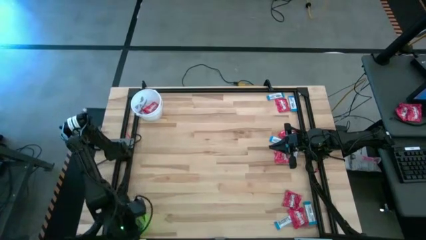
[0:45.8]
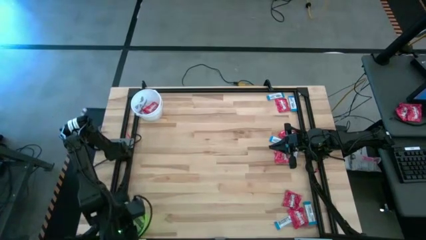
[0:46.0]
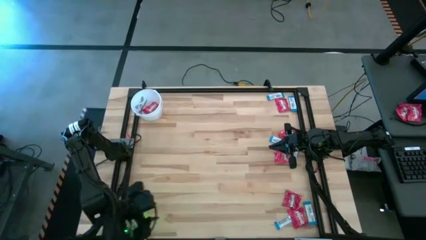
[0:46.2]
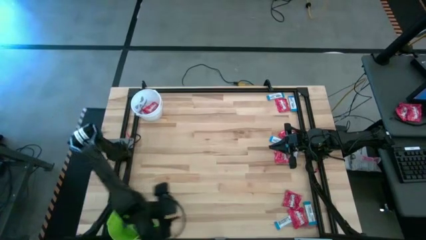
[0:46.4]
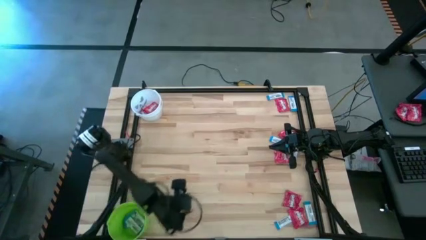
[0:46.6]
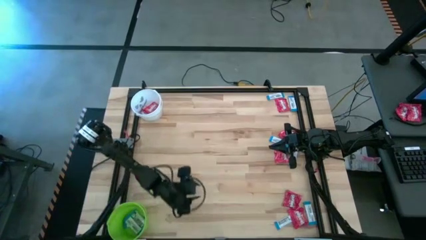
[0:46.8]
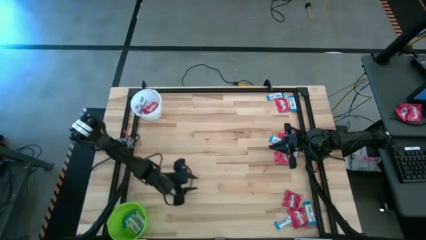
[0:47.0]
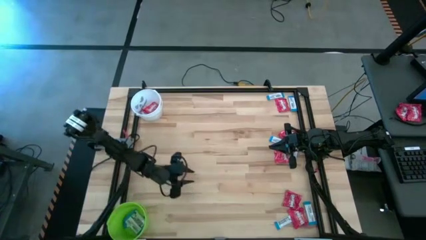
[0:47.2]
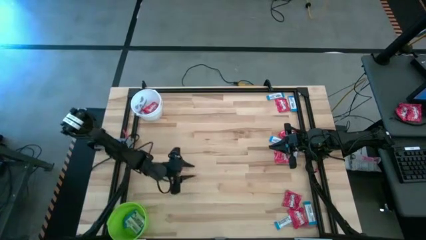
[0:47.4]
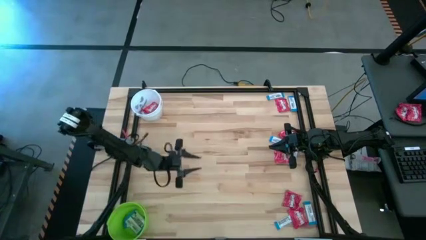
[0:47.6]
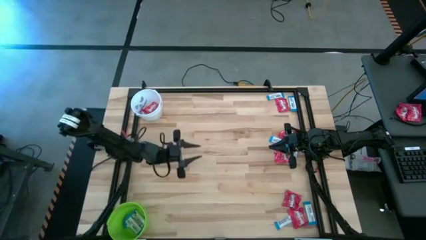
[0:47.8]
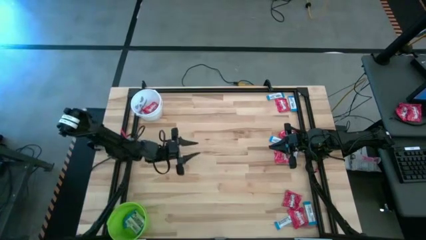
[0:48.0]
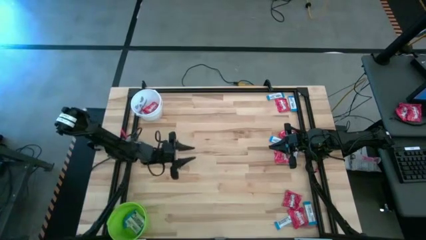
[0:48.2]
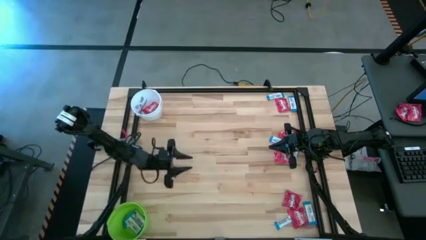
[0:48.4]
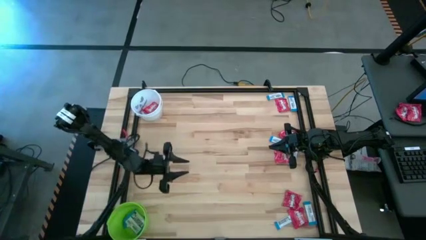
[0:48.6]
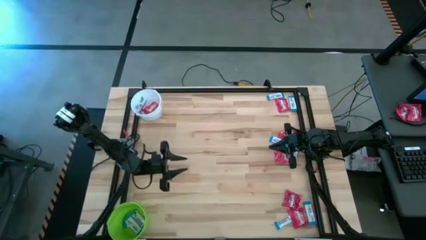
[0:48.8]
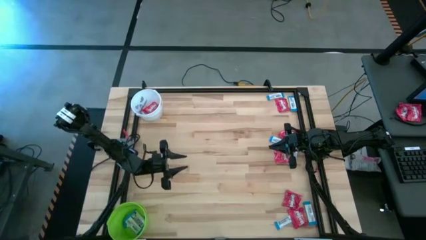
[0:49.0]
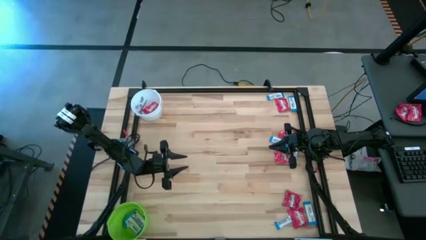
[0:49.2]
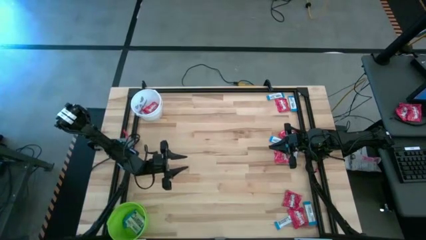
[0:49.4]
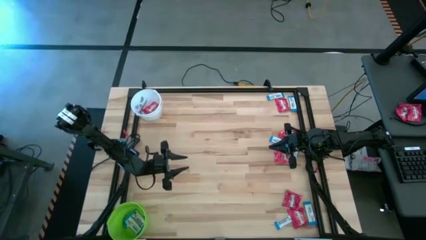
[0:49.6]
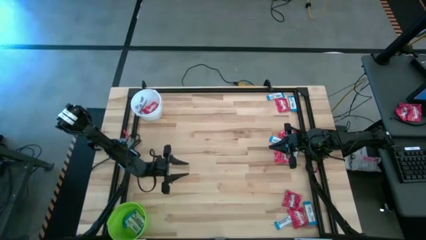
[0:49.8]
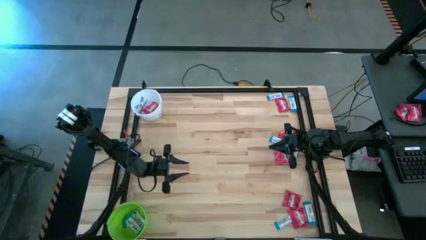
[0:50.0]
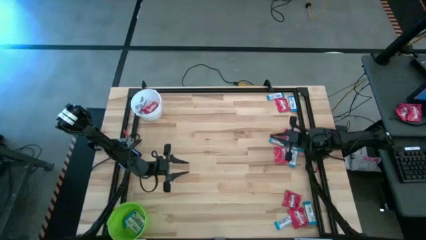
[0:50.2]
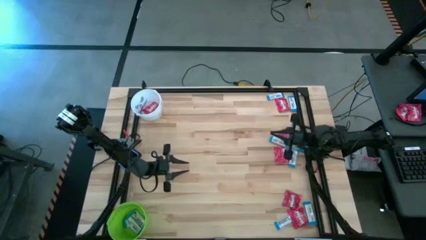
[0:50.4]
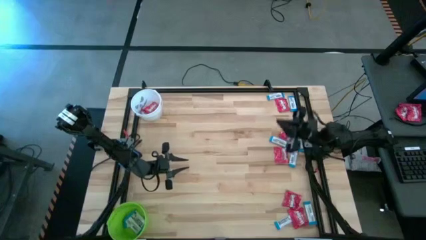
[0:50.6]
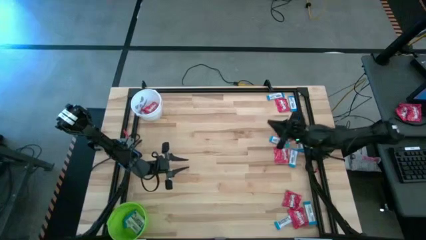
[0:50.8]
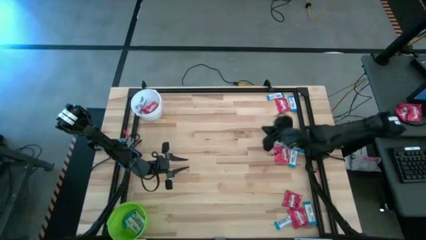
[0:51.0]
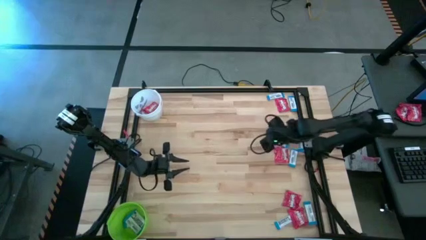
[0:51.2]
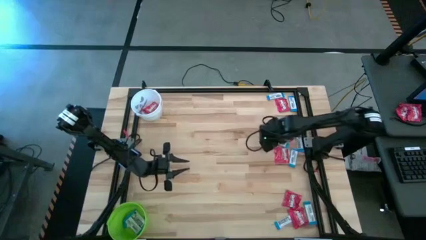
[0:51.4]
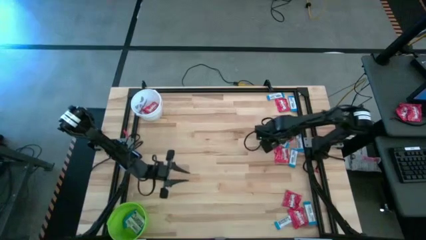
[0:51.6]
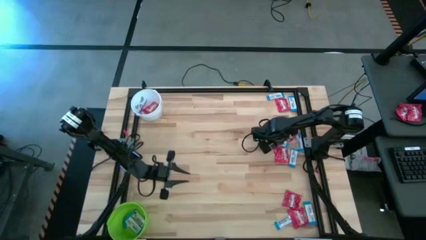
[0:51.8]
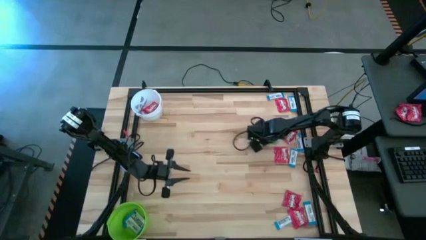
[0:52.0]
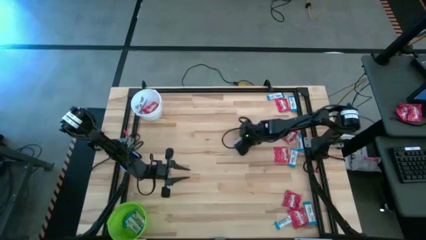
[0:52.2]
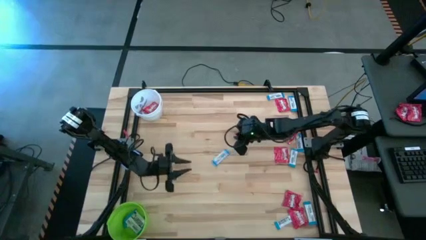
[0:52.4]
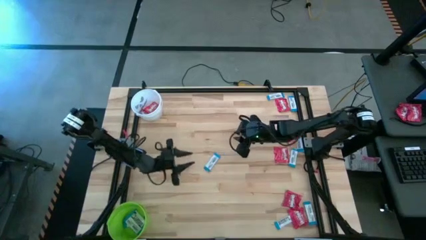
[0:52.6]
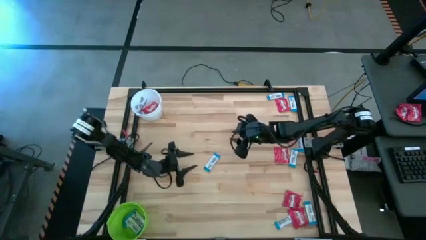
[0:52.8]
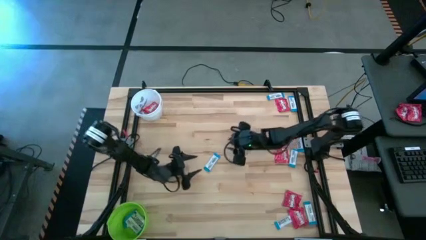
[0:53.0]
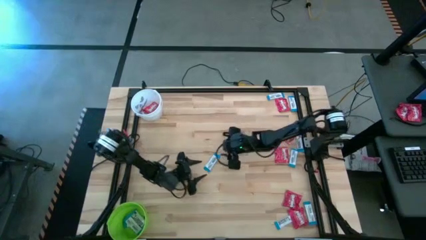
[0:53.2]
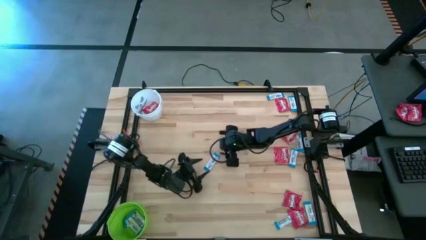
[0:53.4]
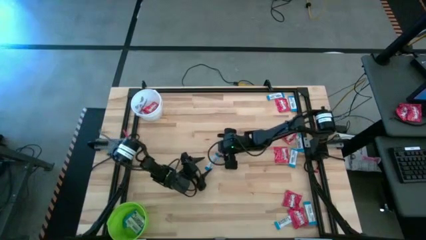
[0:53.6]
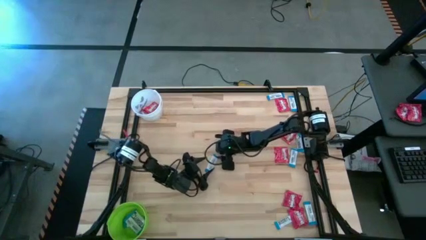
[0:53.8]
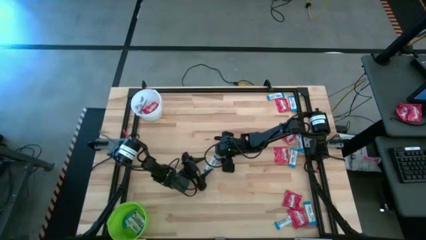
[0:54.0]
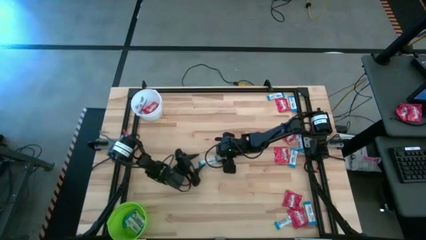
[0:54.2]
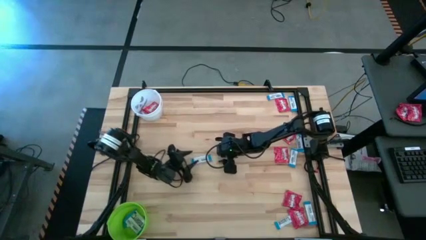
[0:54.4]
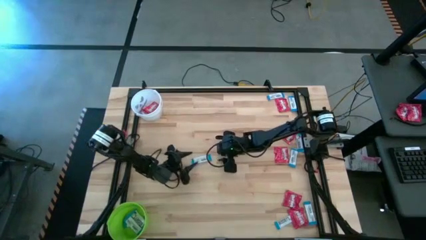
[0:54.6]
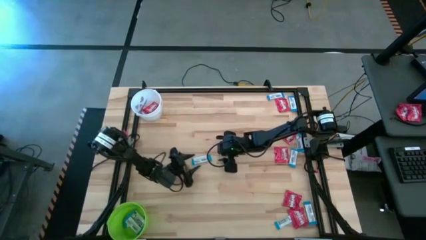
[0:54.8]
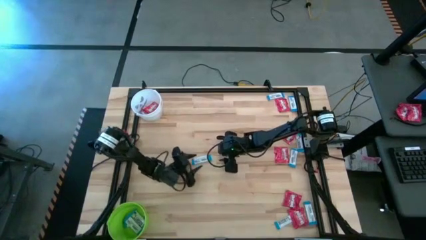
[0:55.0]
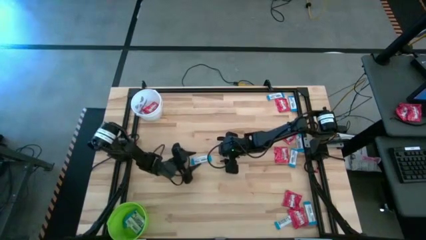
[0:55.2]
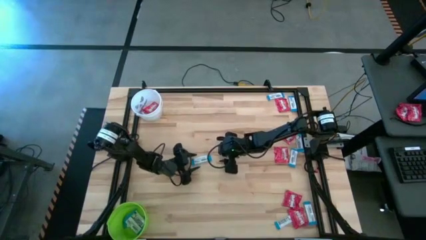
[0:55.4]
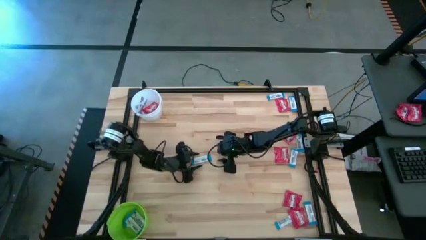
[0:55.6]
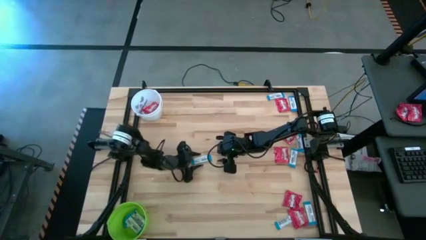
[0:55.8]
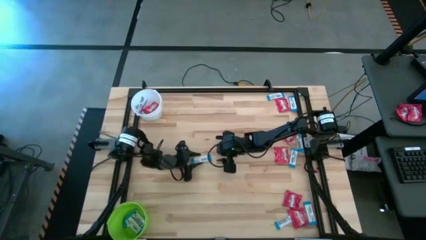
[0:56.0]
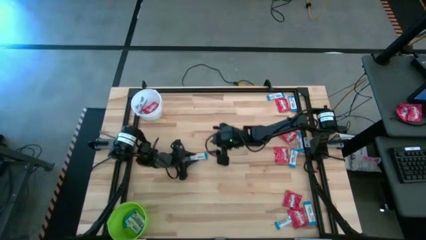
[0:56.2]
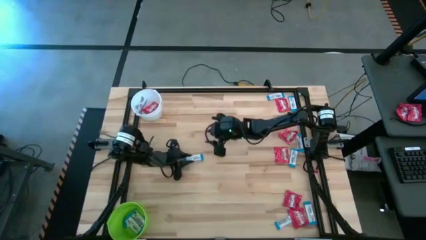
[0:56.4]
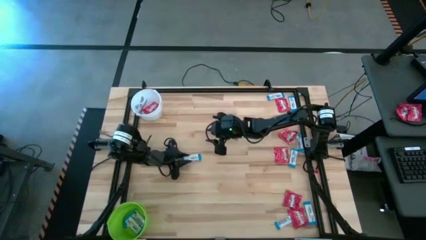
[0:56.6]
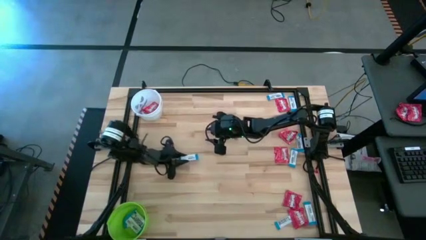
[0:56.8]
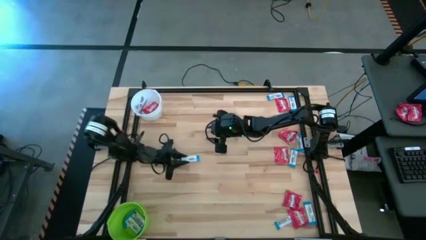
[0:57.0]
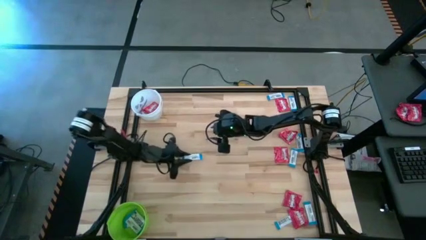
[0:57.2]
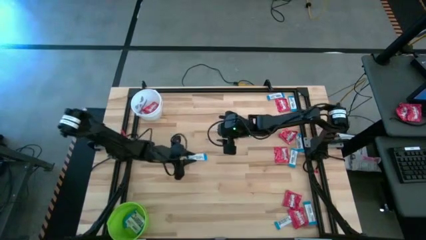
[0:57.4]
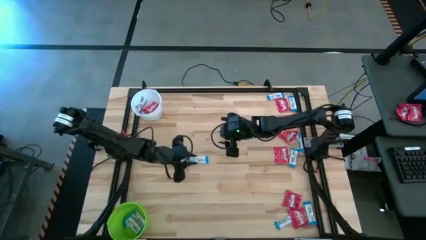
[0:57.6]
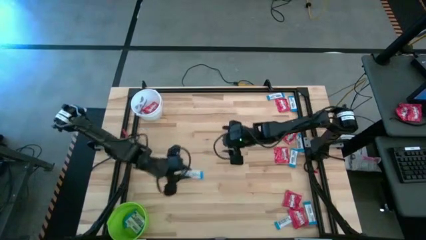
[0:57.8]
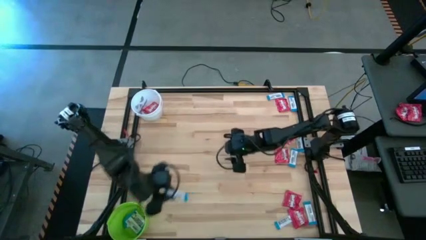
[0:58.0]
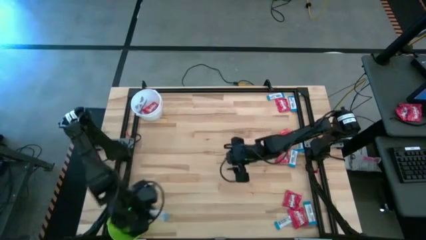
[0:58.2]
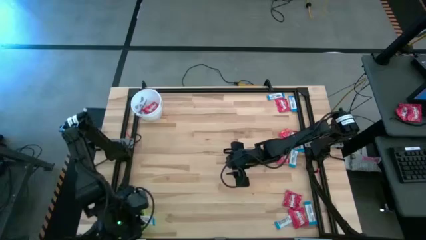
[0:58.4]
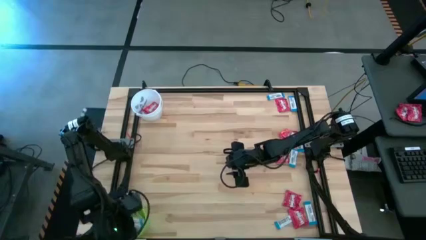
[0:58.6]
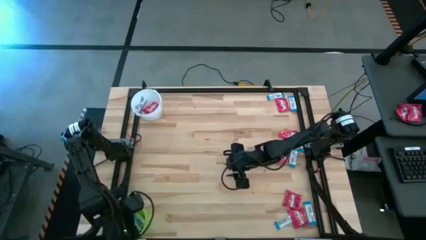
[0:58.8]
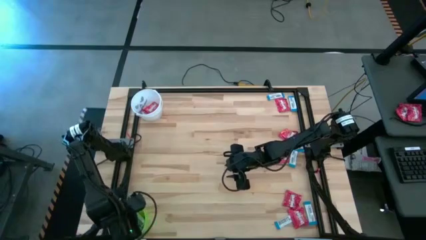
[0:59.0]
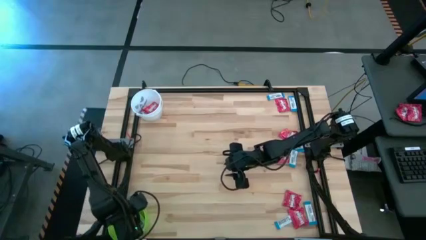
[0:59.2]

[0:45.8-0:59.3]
Task: Sort candy by brand, put in halloween buckets
Put the blue chocolate bar into the green bucket

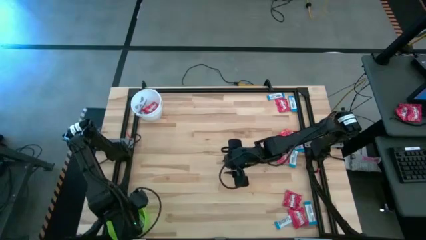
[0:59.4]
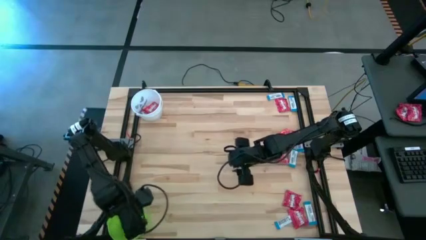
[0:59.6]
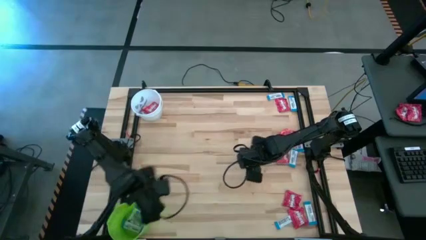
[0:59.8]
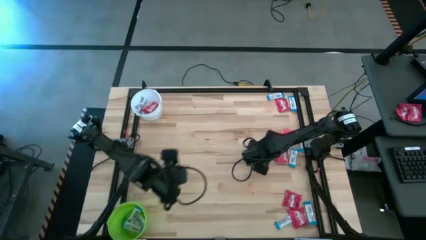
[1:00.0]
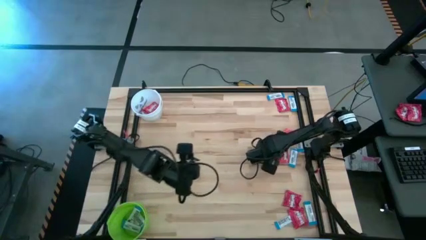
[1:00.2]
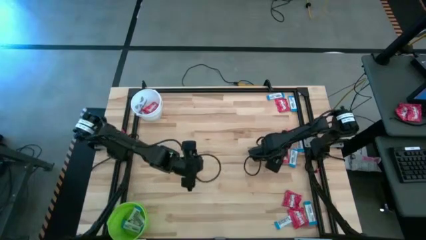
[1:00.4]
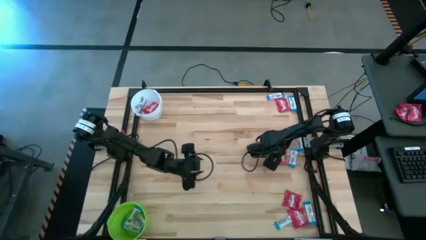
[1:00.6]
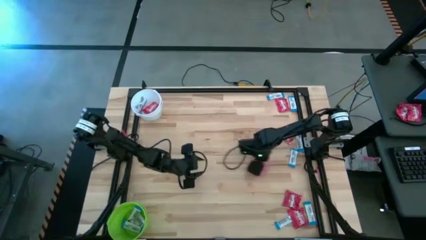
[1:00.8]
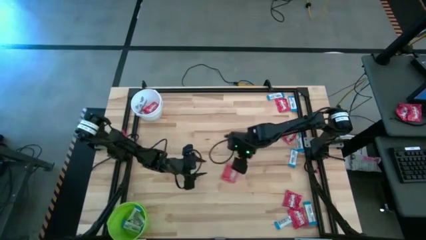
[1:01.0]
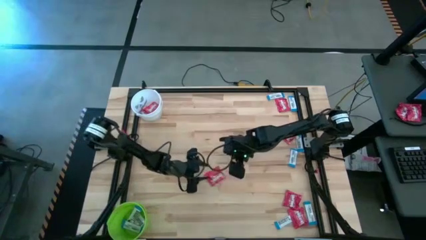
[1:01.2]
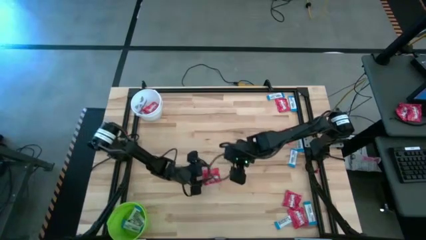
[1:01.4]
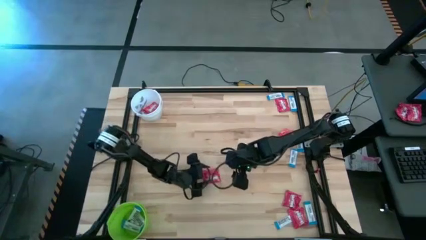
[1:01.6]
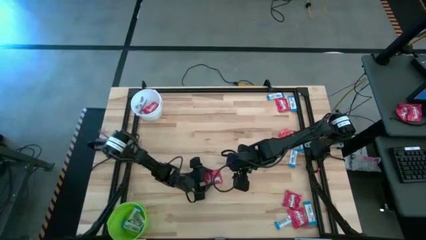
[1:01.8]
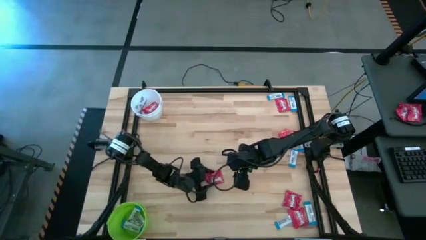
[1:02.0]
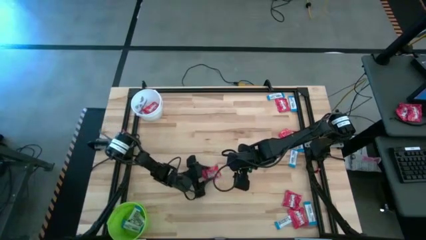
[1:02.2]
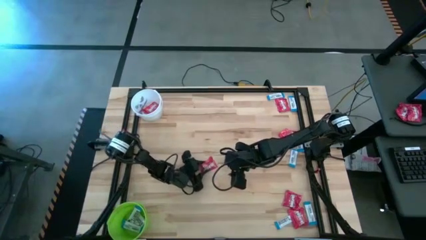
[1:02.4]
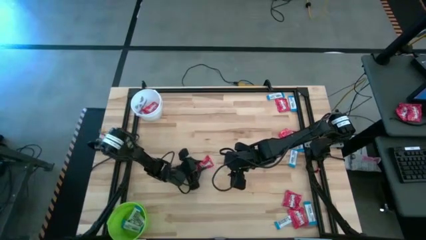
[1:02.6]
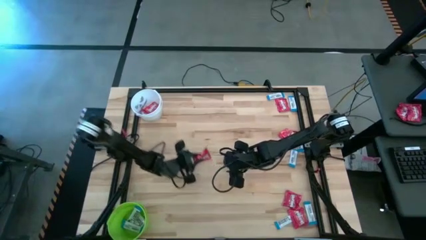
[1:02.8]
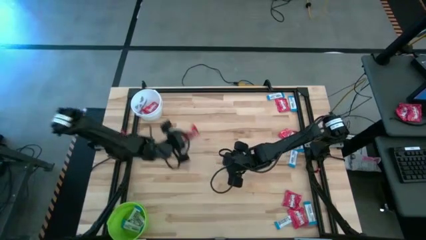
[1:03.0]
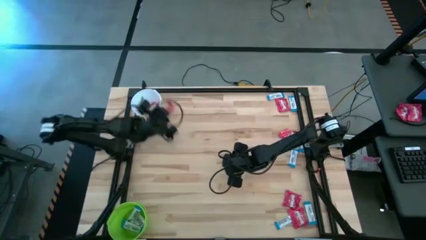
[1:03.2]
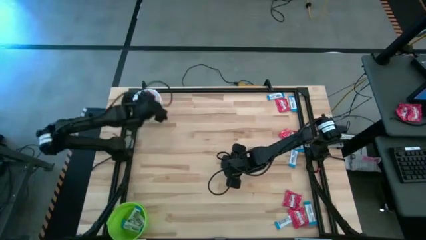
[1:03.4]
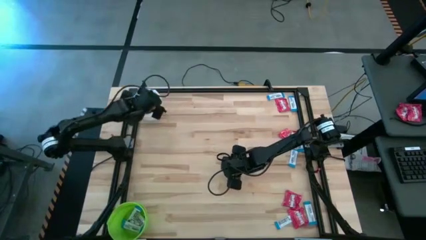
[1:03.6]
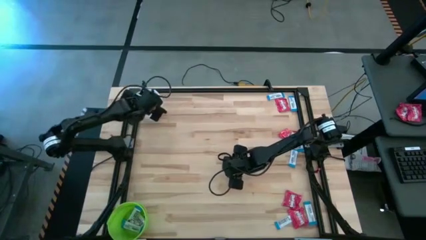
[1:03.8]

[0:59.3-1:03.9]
Put the red candy into the white bucket
